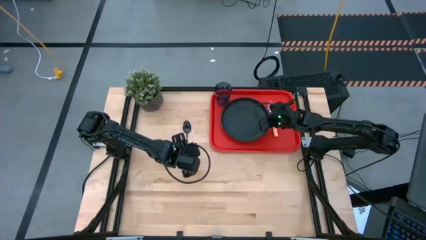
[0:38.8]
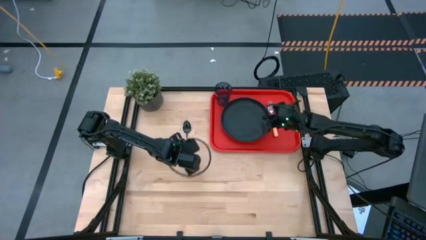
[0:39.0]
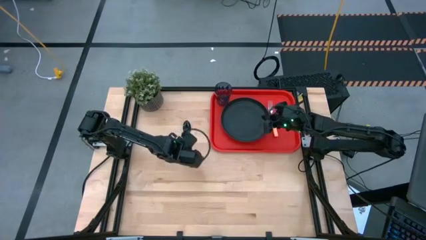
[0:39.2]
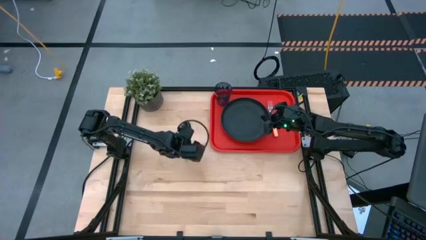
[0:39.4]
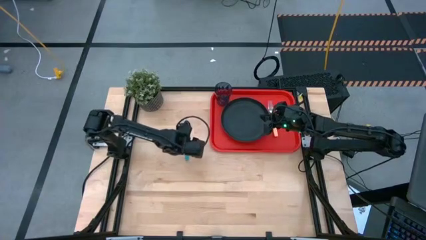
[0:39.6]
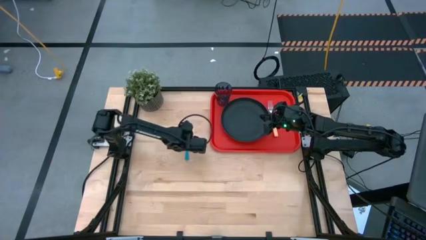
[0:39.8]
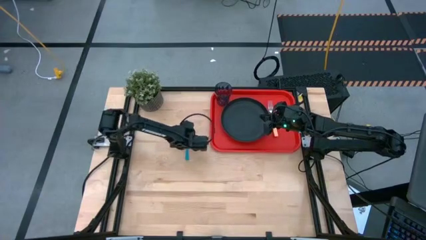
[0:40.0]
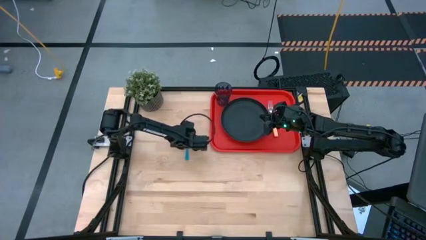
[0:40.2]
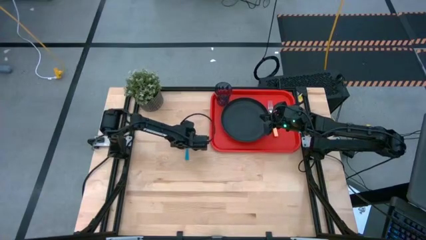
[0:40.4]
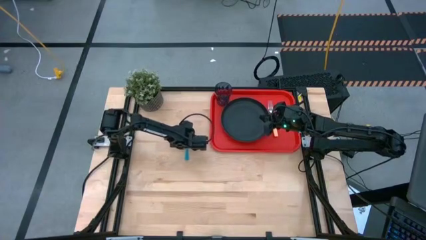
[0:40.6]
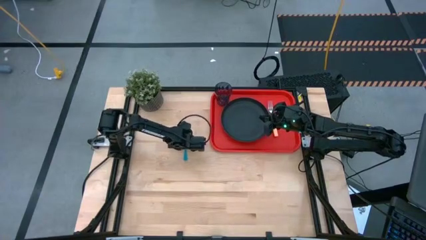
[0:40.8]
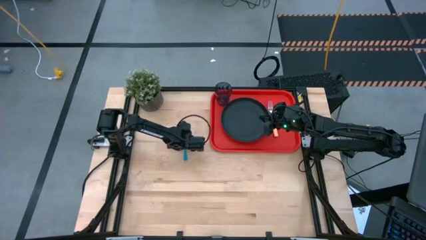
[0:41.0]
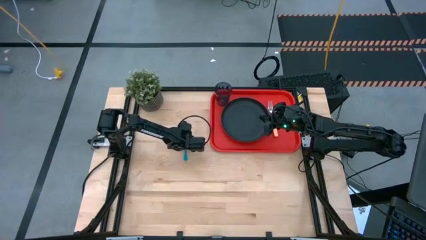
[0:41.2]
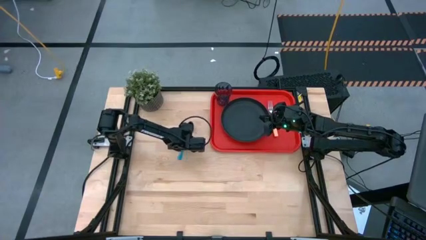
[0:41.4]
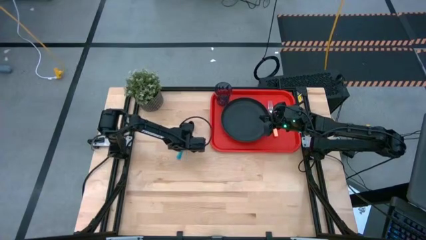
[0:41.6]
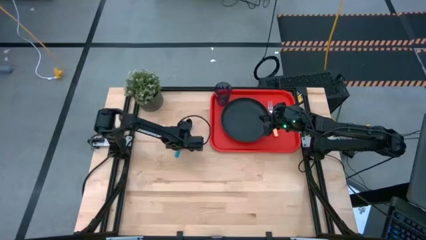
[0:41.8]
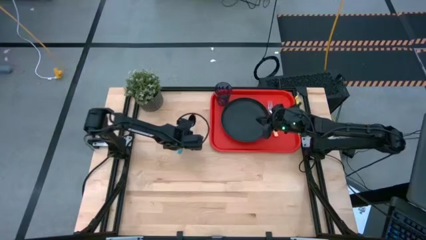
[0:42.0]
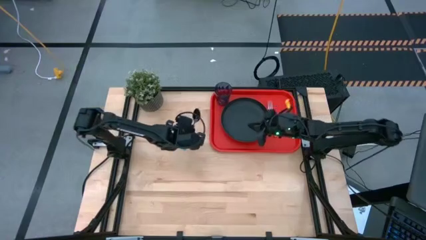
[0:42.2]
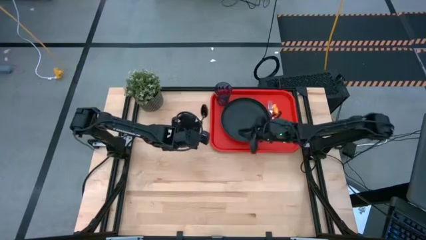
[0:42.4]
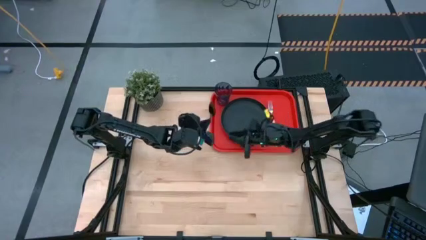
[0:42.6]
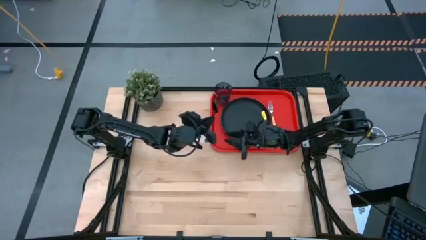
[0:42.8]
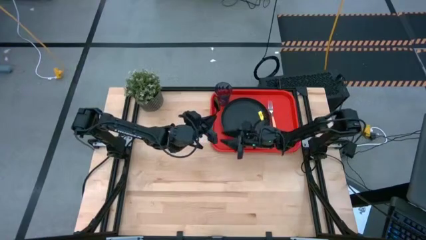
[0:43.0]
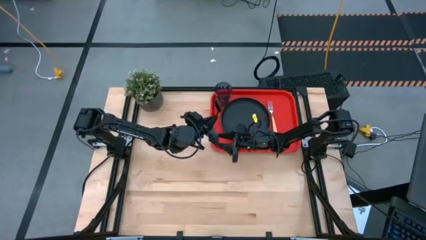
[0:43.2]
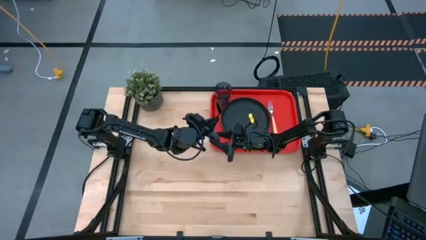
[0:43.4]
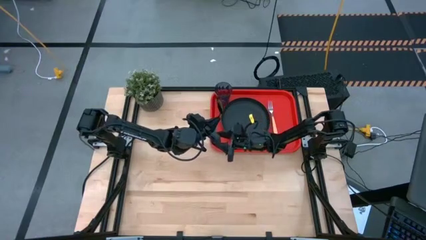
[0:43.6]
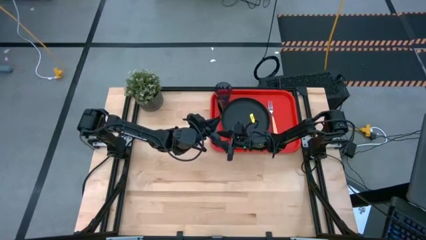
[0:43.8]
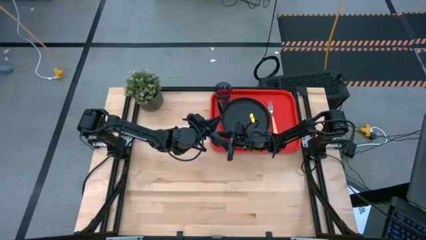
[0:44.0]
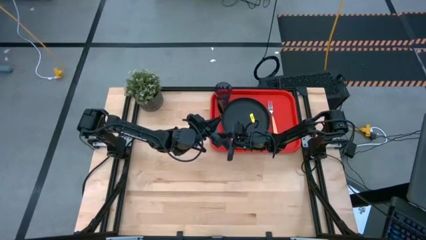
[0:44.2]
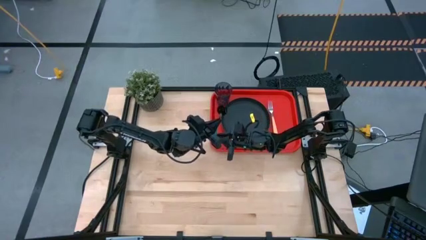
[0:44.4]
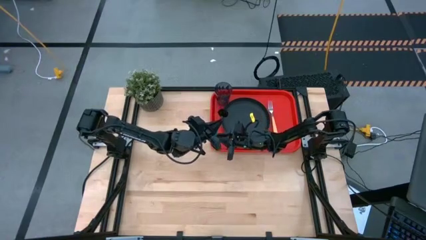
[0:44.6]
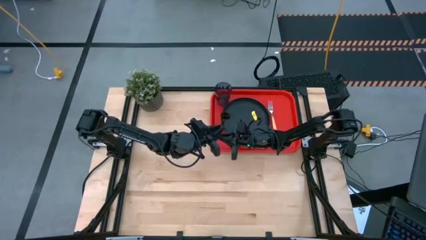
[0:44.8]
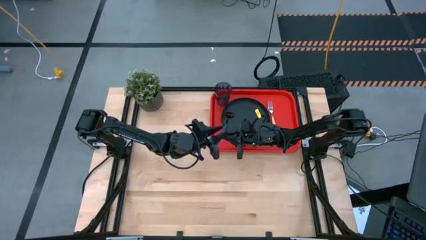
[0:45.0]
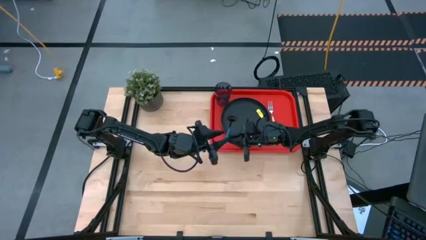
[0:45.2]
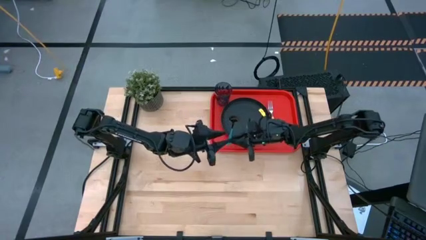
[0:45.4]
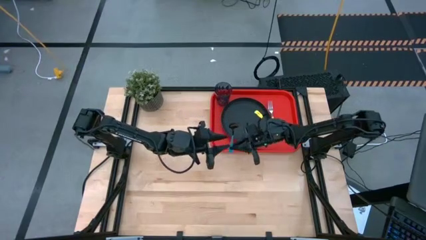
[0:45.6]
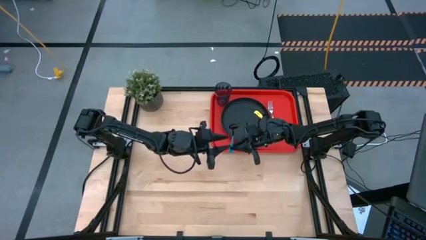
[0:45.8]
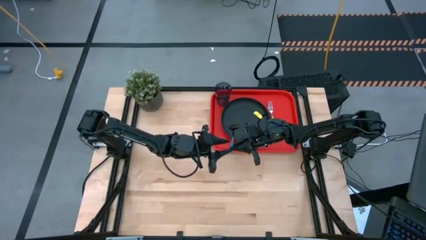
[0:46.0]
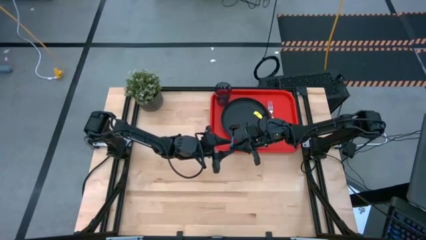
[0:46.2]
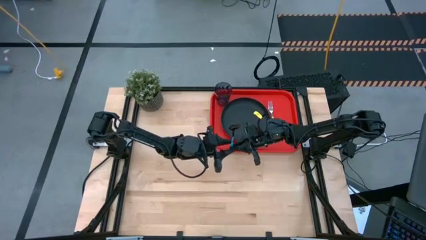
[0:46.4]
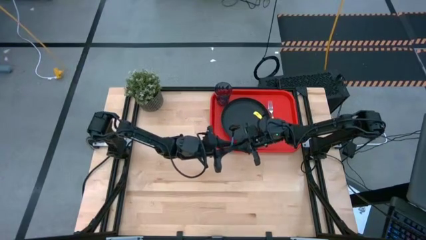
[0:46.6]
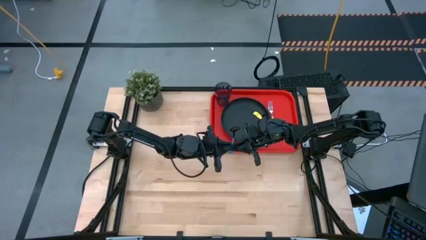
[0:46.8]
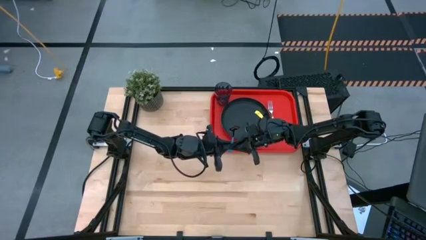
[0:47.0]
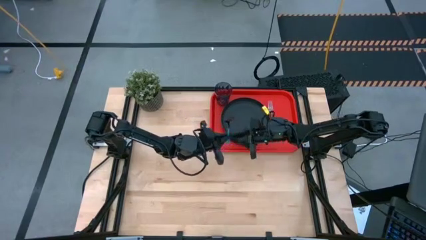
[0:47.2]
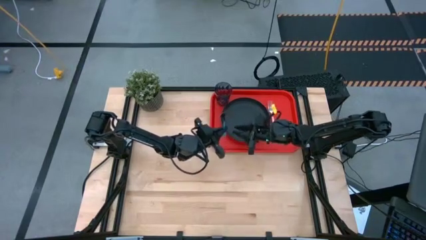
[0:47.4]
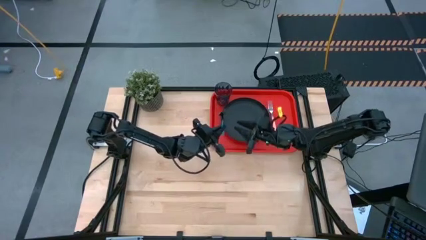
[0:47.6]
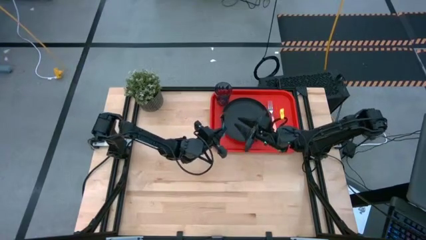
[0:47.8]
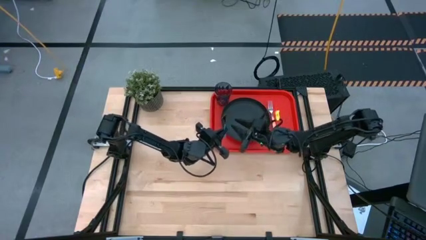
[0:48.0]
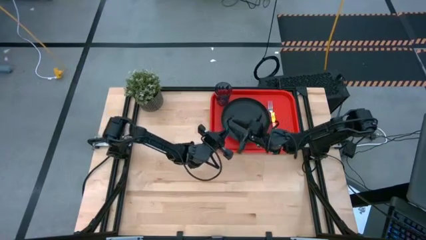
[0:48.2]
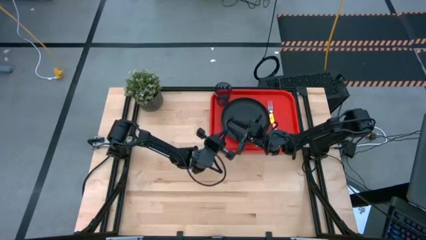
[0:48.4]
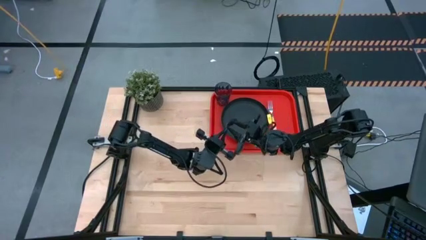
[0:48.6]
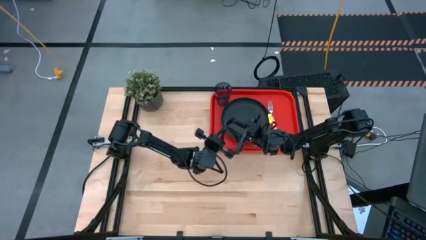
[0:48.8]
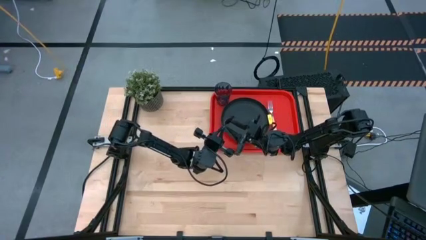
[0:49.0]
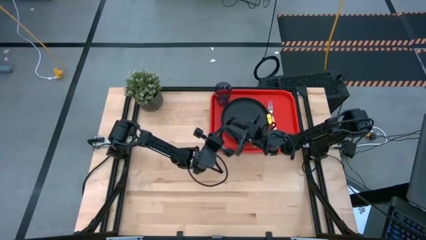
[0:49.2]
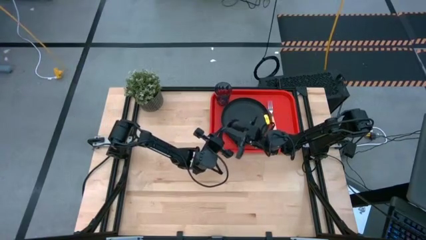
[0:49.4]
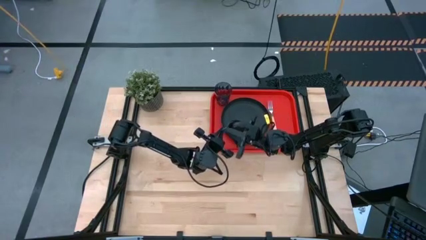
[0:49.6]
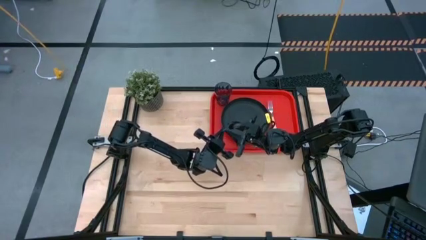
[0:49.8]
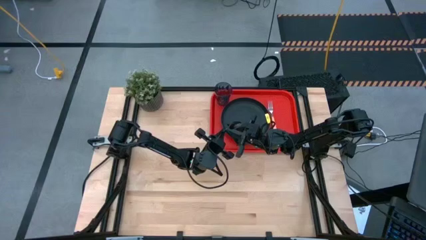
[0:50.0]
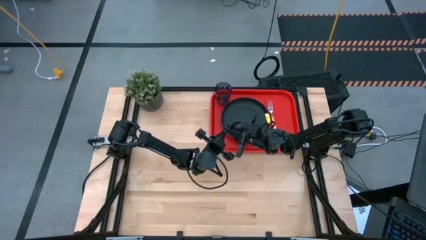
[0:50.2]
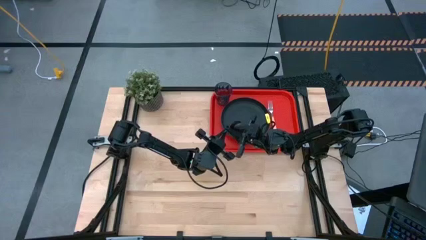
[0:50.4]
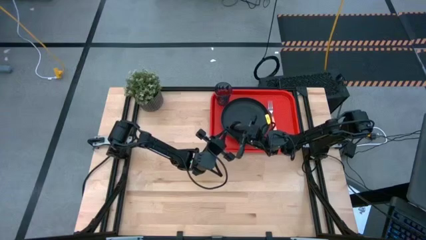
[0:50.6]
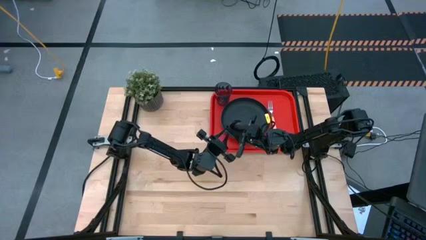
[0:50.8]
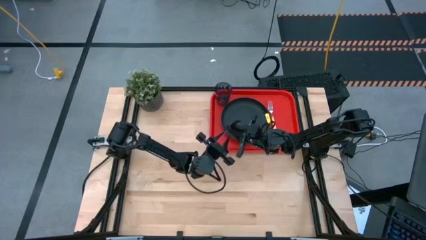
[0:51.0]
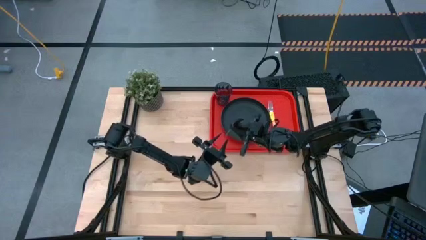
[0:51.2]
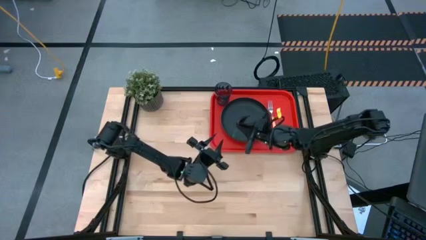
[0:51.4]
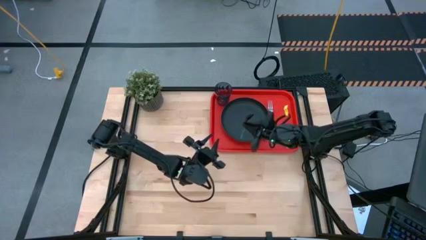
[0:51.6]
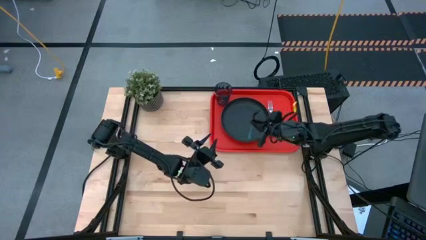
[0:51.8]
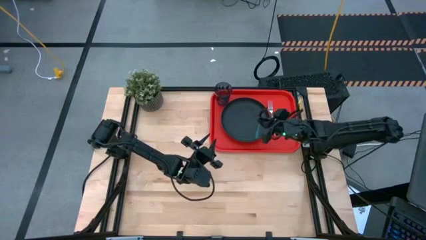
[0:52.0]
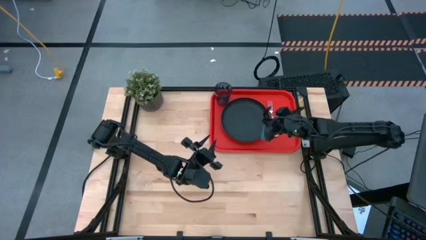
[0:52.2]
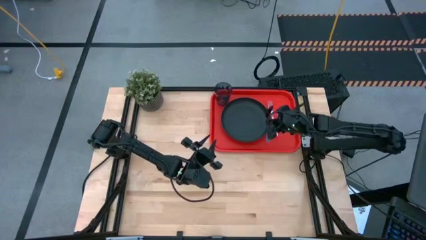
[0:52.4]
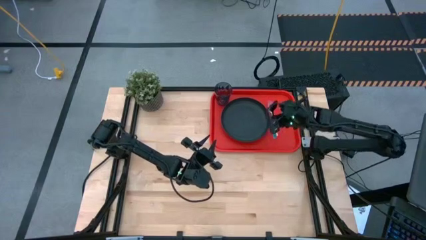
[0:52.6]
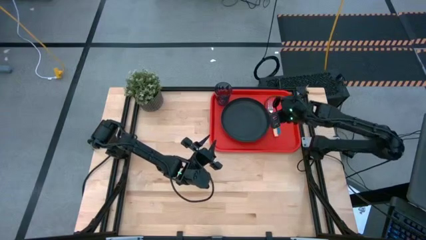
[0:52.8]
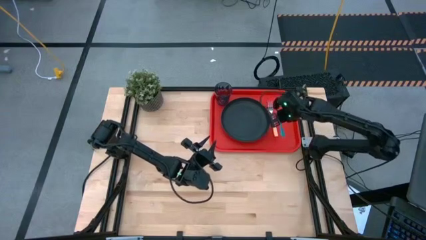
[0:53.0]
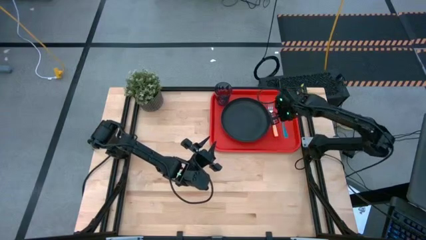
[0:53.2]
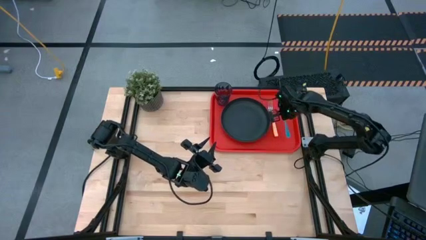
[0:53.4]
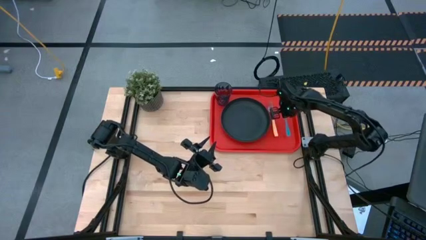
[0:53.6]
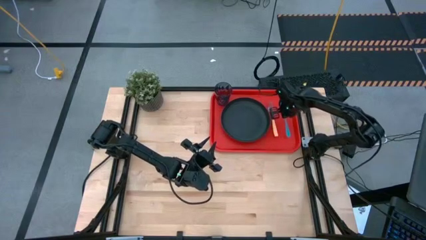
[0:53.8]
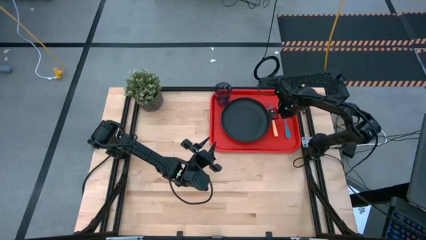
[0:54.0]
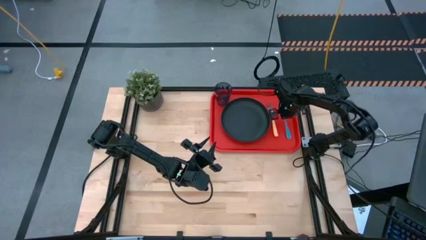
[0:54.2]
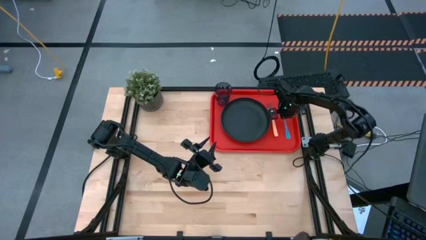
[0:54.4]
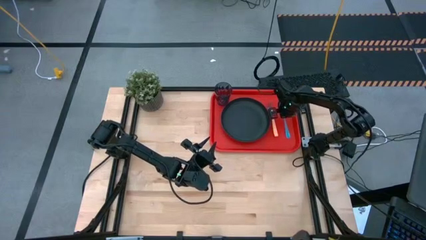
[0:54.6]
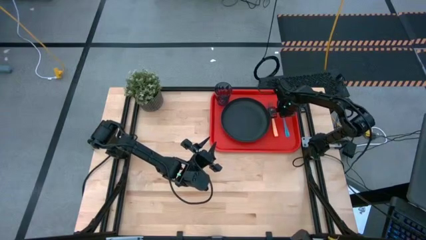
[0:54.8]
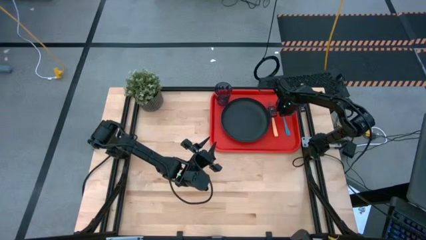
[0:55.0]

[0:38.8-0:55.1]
Task: Pick and place plate/cup/fork/spoon on tray
Put the blue spoon on the serving tray to the right of the yellow fork
